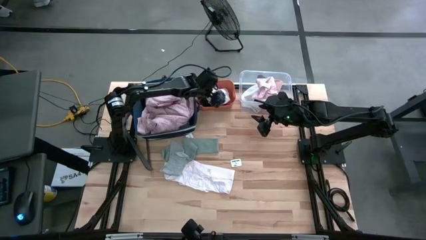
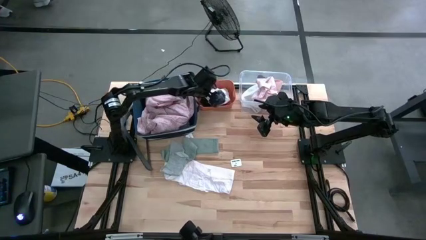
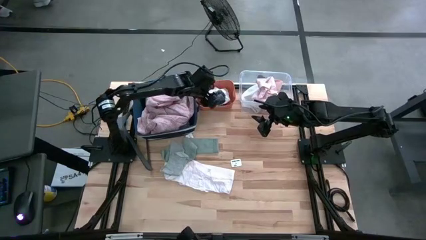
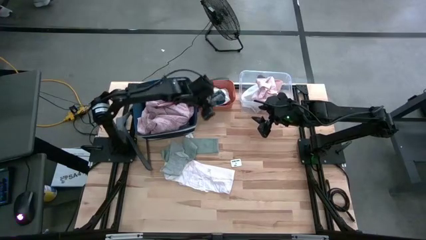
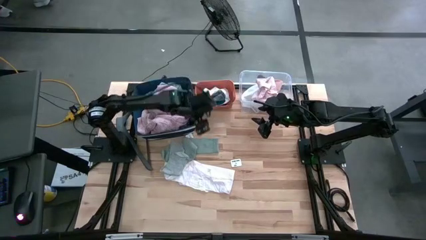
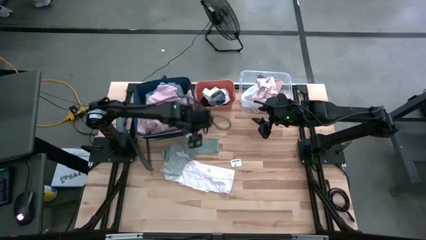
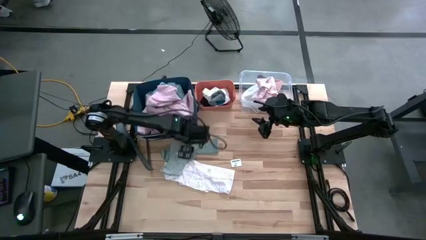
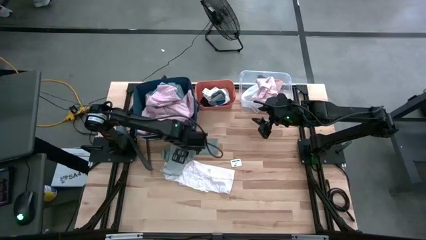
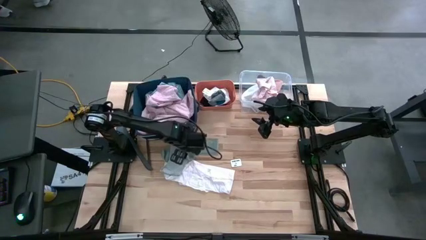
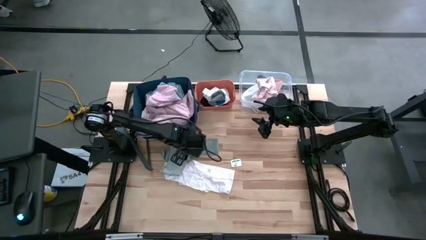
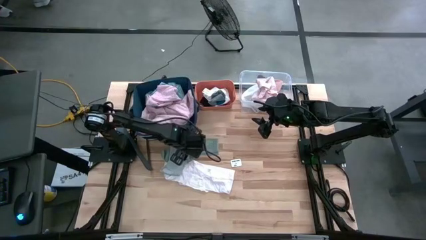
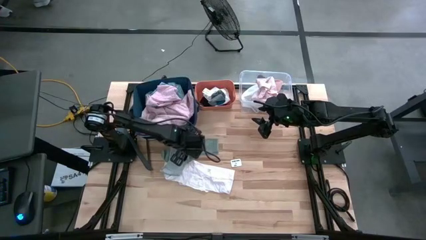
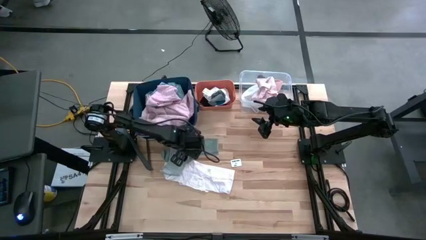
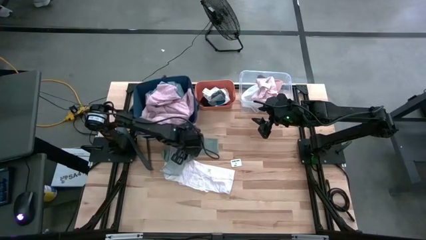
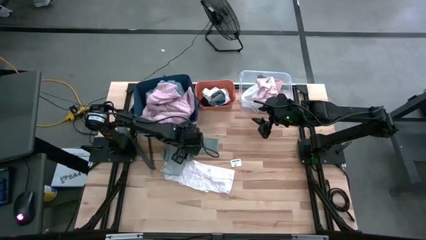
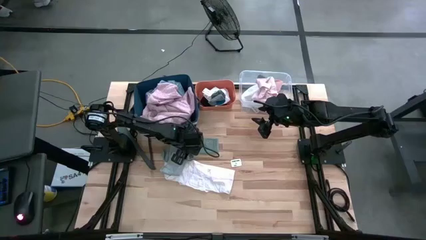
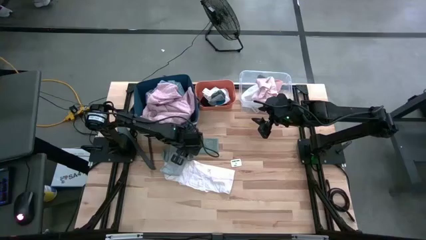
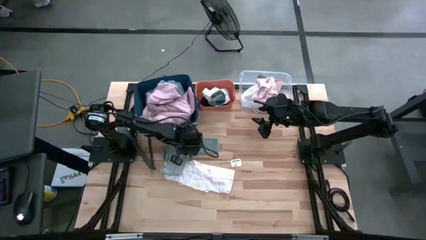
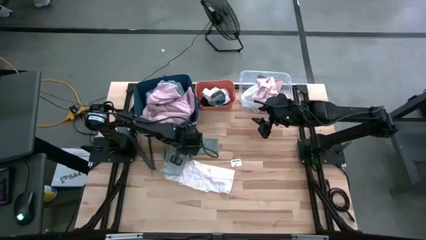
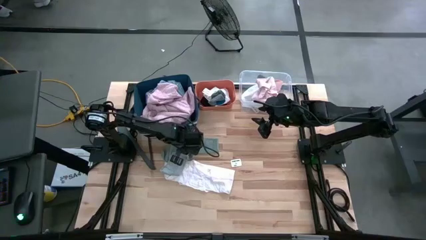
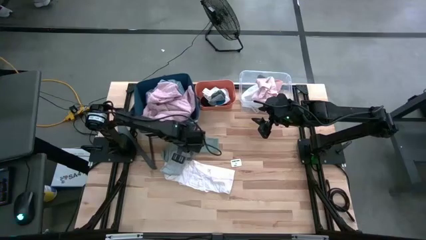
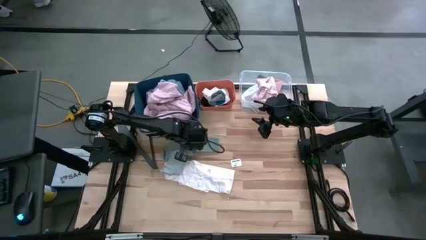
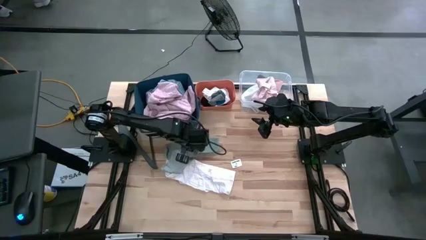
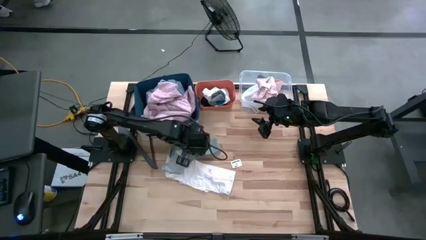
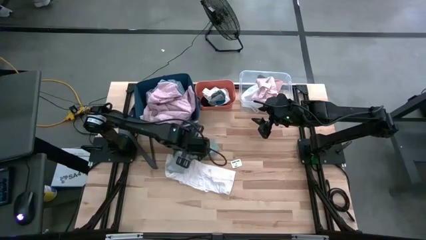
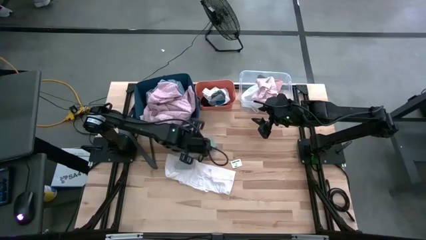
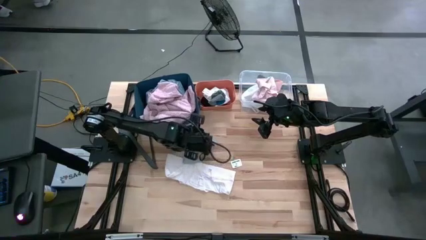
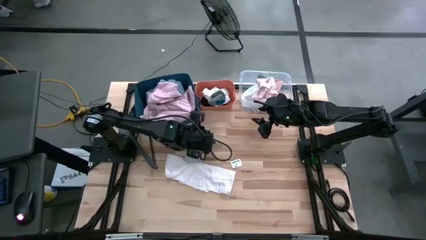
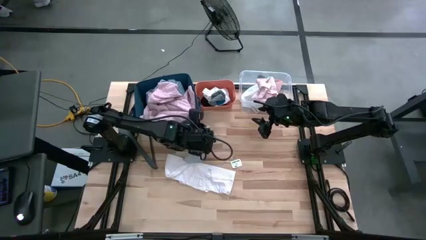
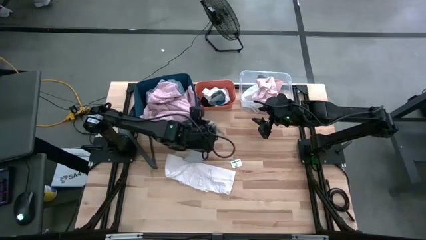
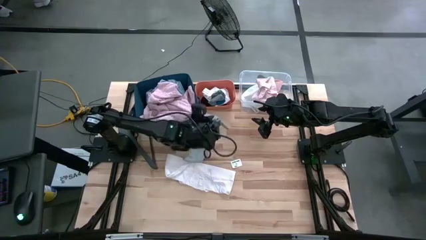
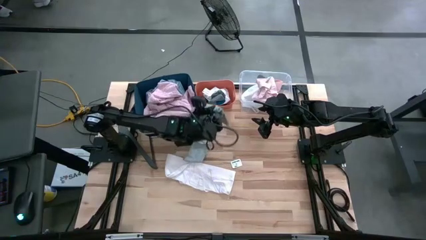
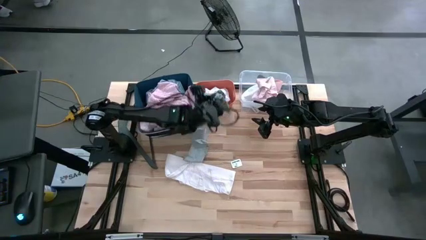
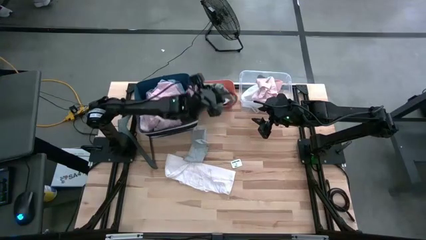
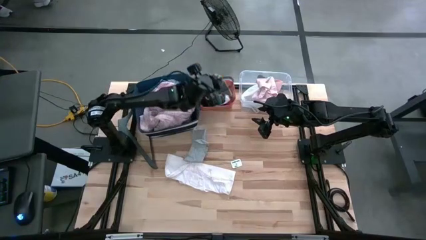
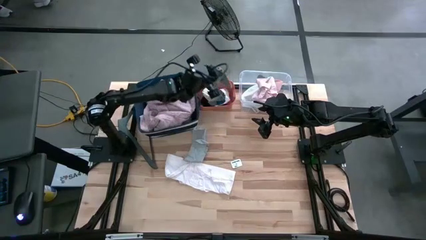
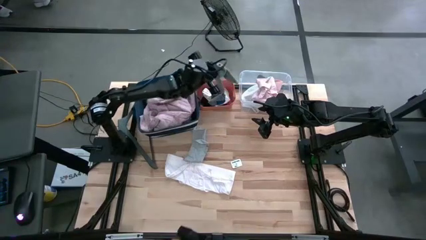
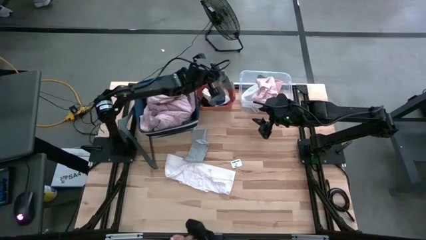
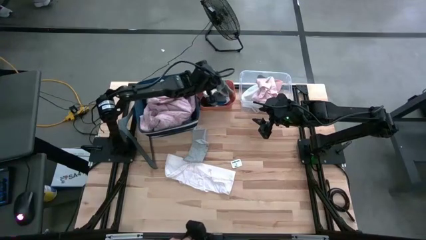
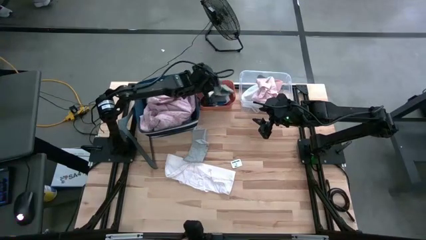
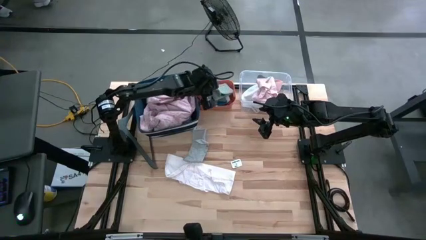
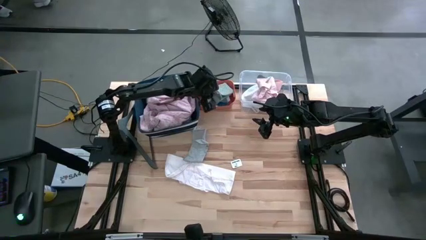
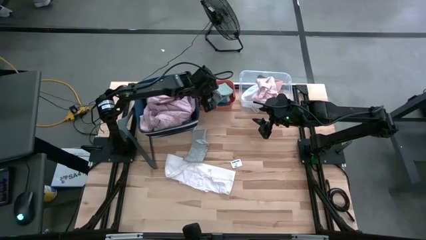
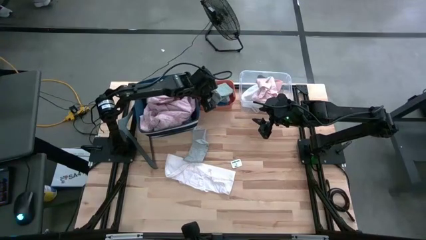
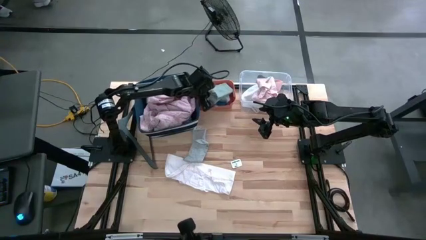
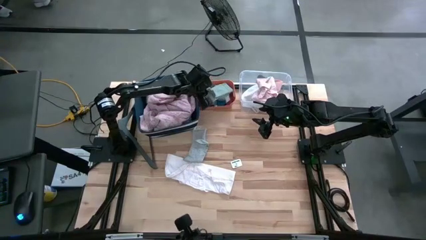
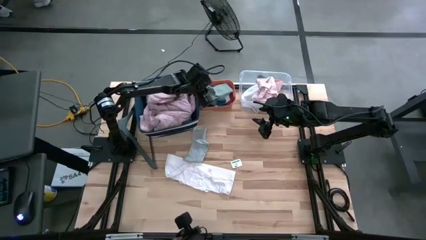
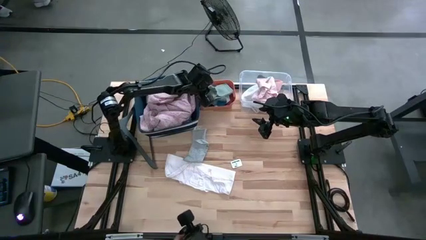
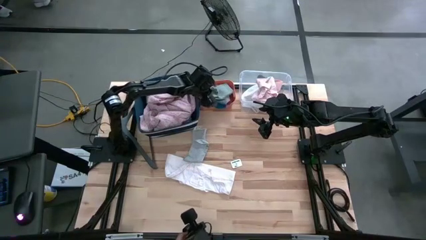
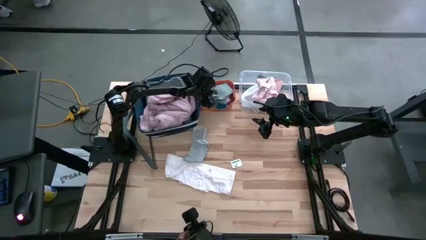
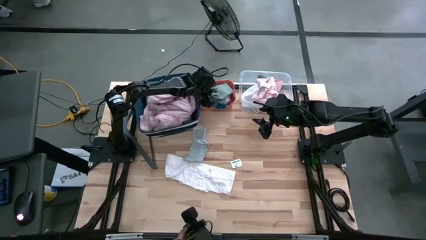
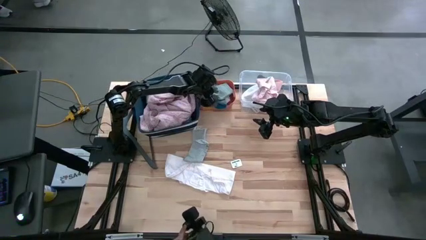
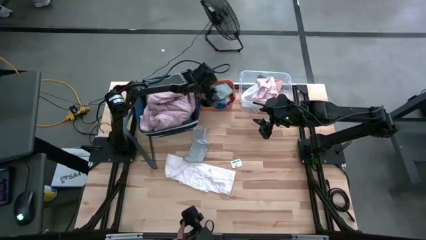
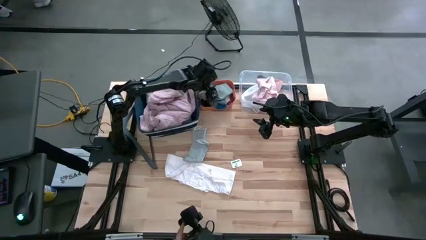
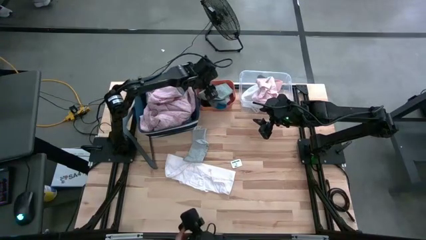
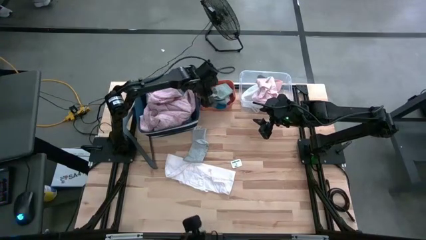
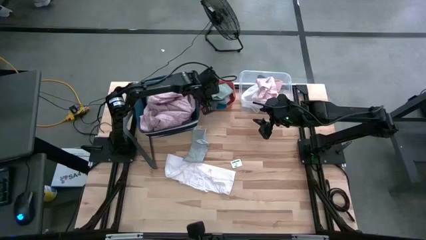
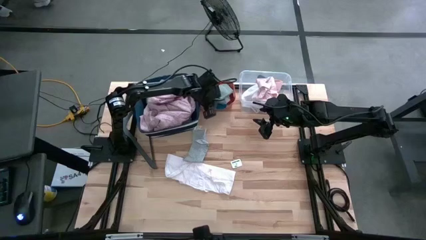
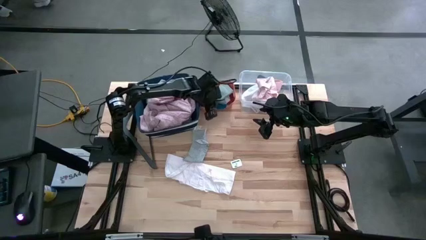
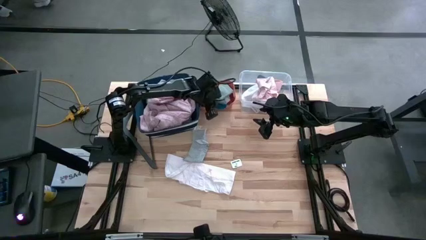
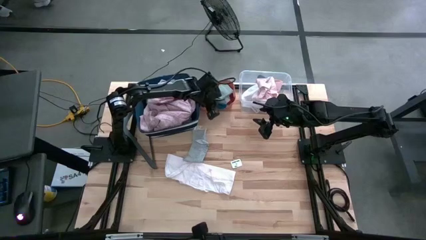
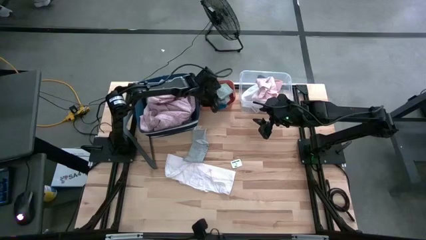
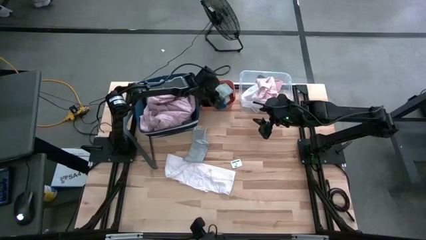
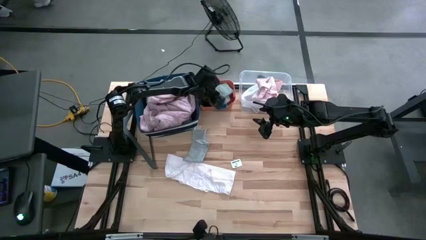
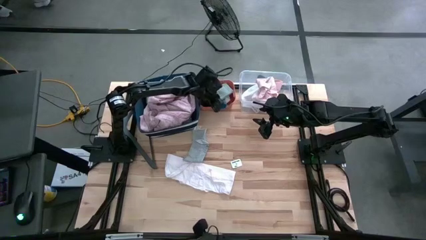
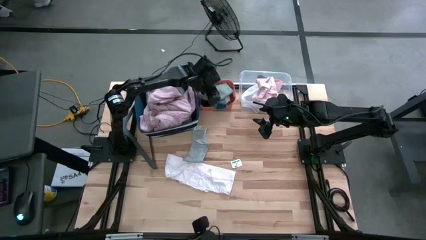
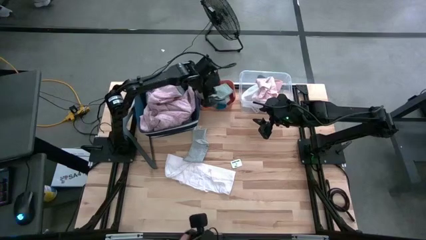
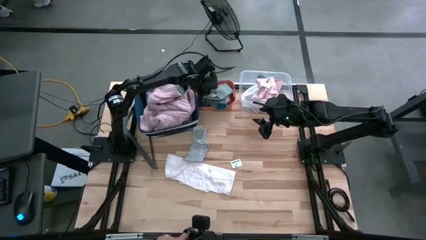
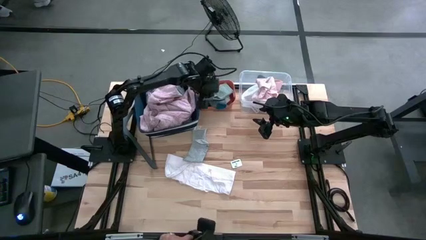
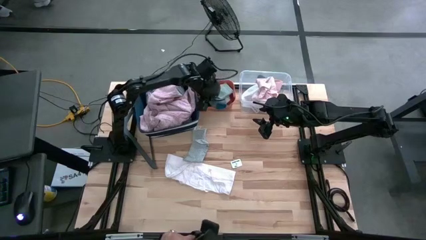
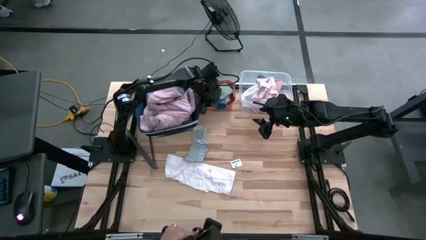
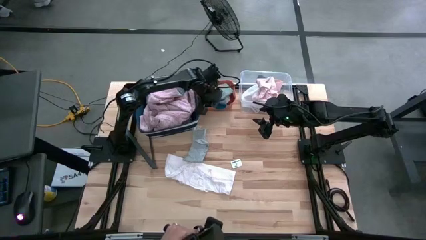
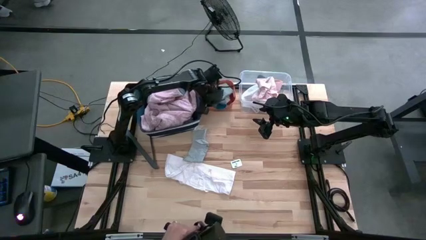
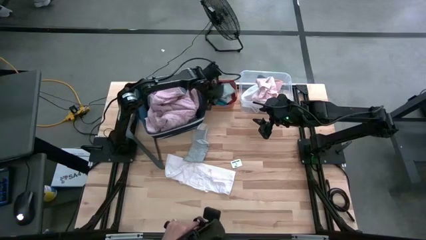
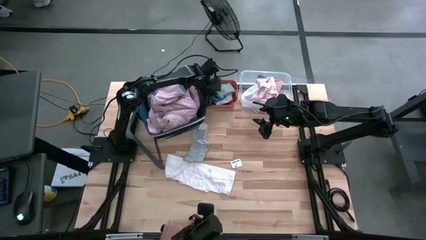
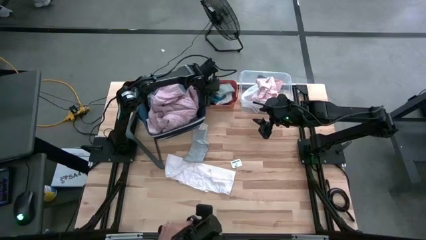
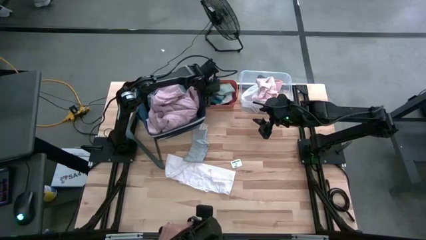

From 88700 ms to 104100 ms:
Task: Pick & Place Cloths
Put the gray sock into the orange bin
